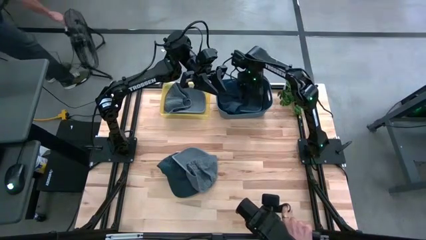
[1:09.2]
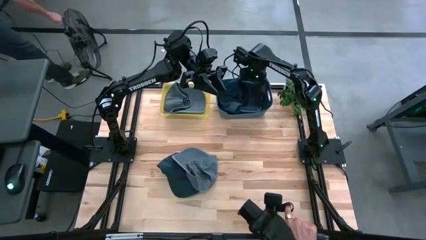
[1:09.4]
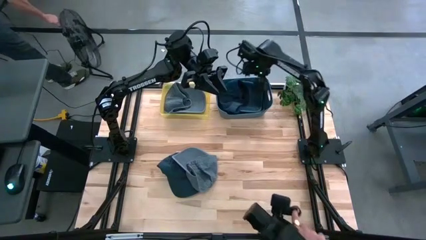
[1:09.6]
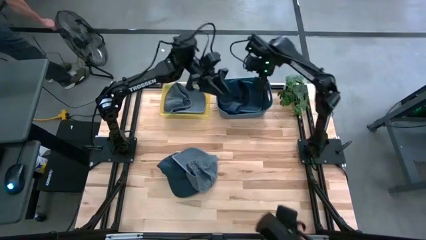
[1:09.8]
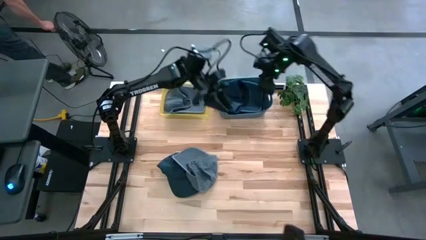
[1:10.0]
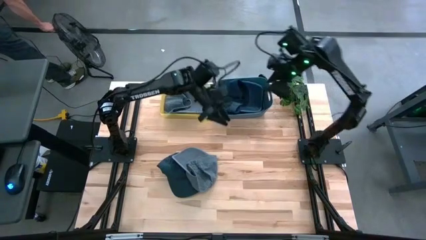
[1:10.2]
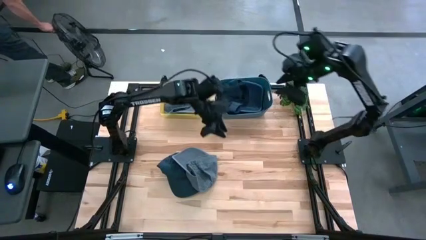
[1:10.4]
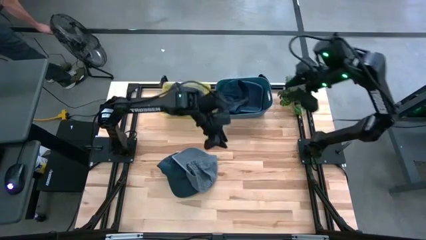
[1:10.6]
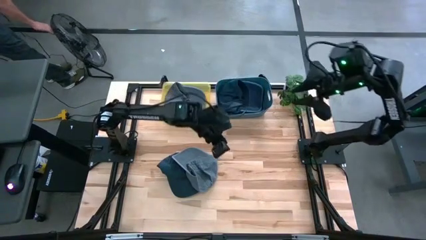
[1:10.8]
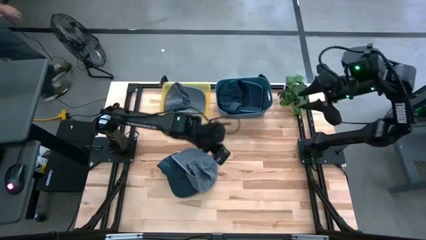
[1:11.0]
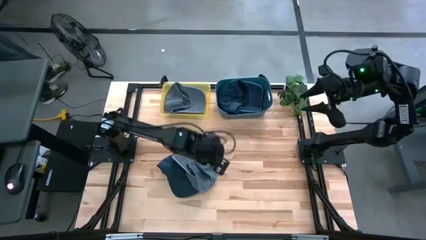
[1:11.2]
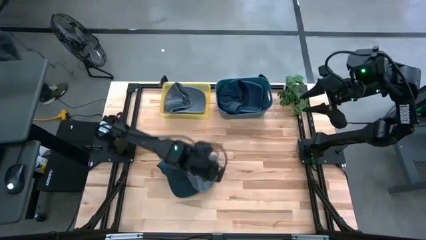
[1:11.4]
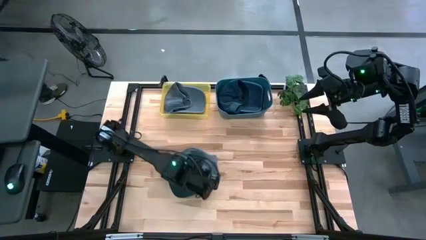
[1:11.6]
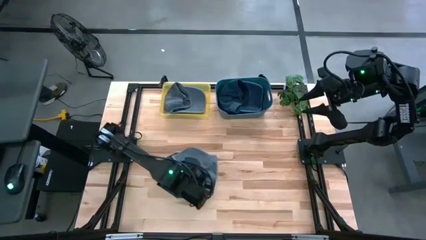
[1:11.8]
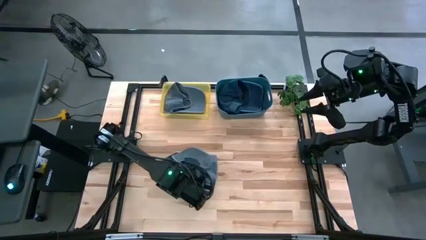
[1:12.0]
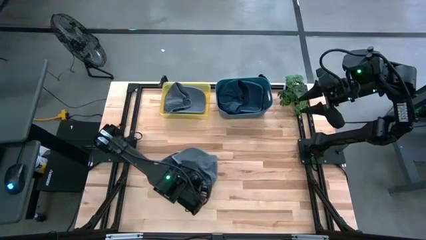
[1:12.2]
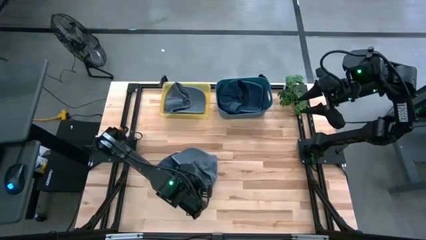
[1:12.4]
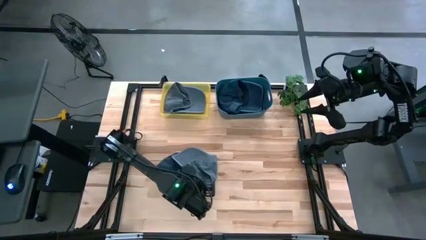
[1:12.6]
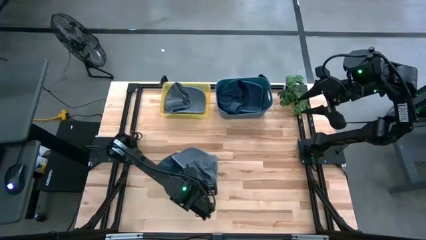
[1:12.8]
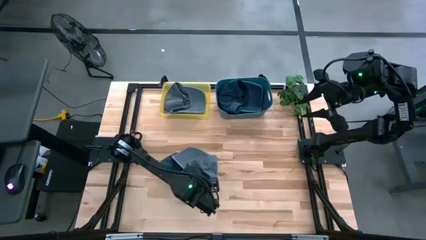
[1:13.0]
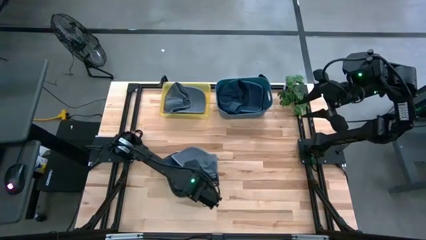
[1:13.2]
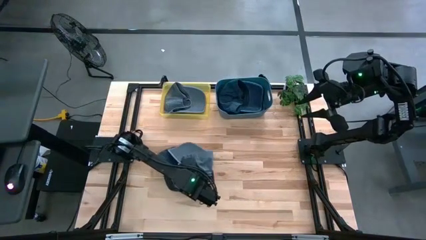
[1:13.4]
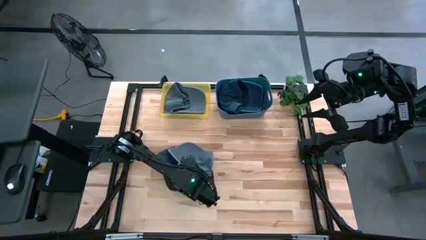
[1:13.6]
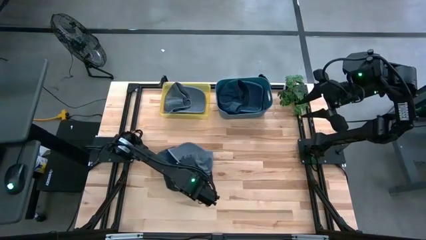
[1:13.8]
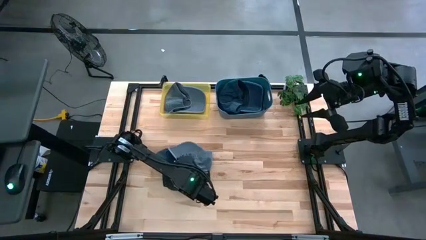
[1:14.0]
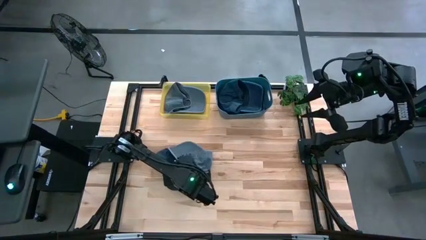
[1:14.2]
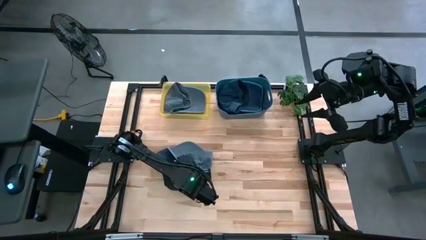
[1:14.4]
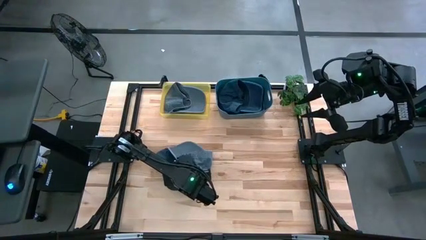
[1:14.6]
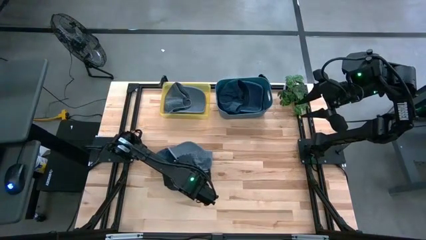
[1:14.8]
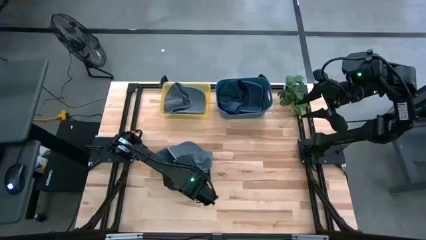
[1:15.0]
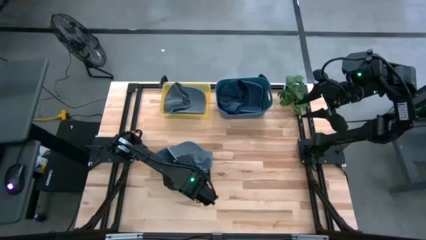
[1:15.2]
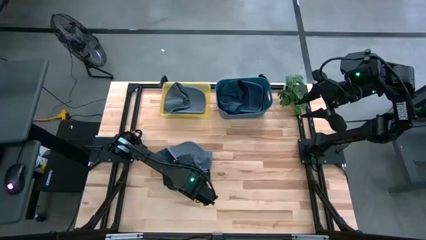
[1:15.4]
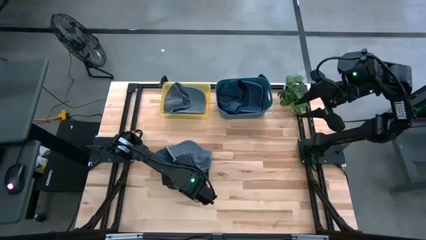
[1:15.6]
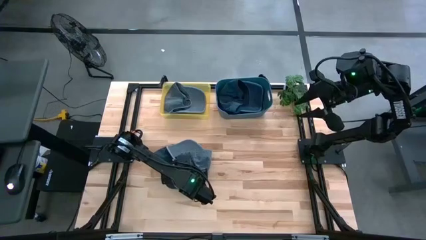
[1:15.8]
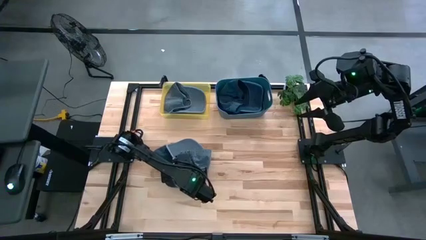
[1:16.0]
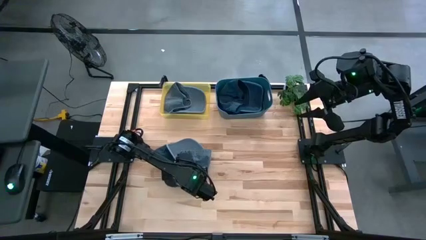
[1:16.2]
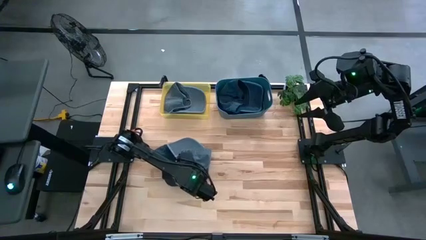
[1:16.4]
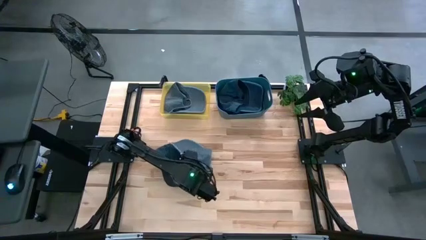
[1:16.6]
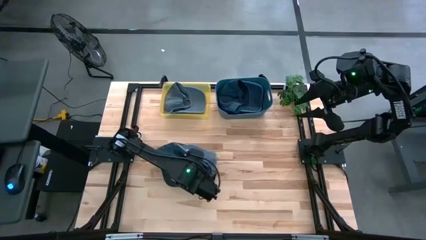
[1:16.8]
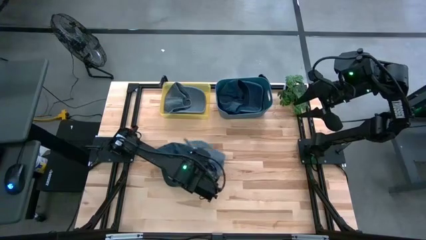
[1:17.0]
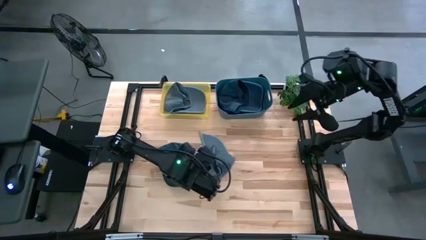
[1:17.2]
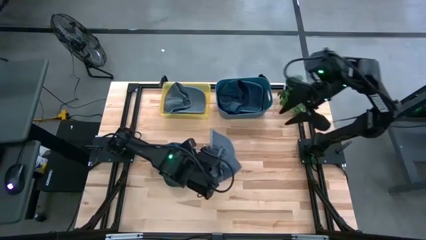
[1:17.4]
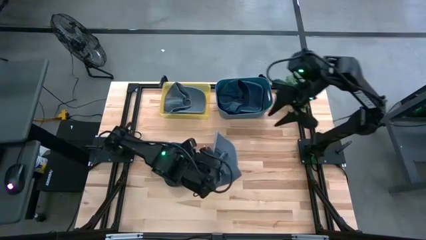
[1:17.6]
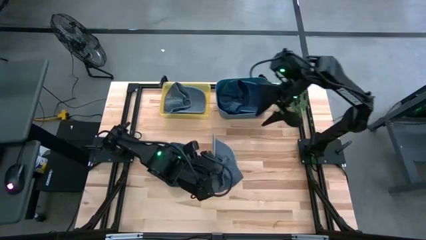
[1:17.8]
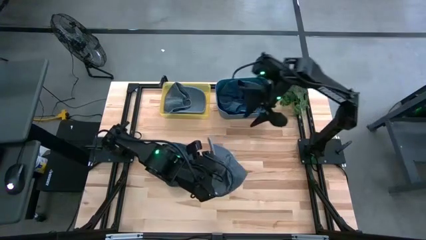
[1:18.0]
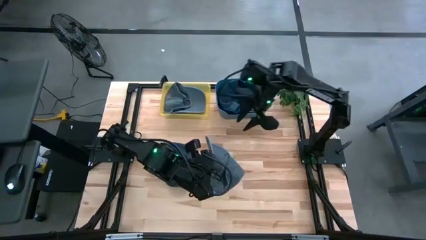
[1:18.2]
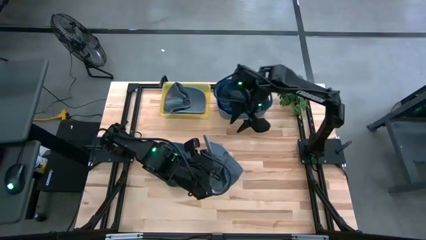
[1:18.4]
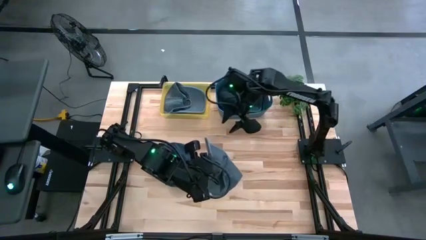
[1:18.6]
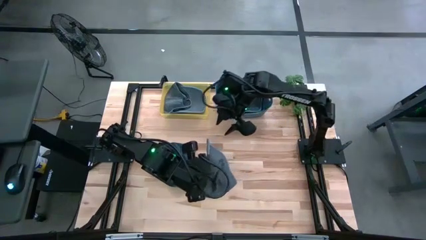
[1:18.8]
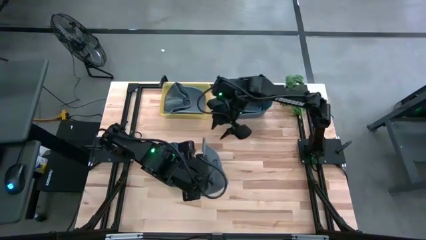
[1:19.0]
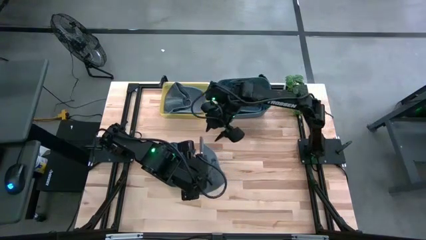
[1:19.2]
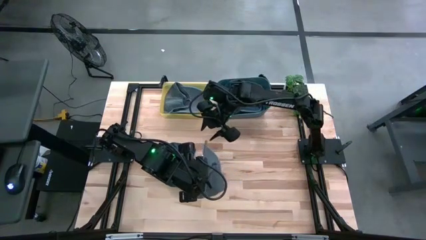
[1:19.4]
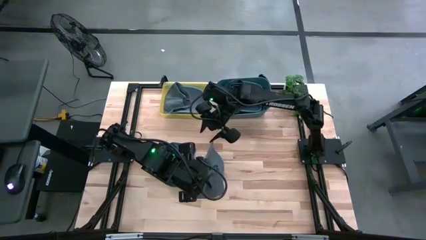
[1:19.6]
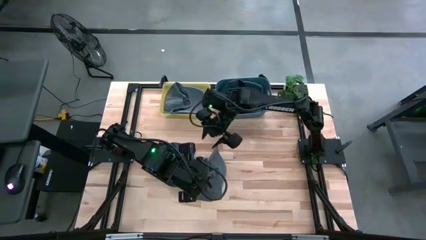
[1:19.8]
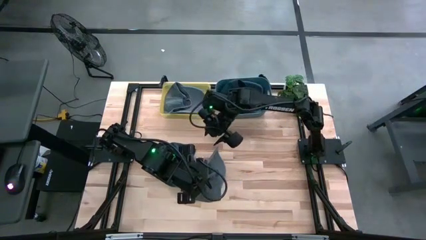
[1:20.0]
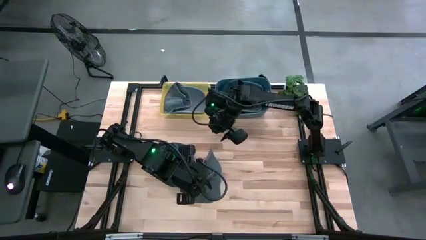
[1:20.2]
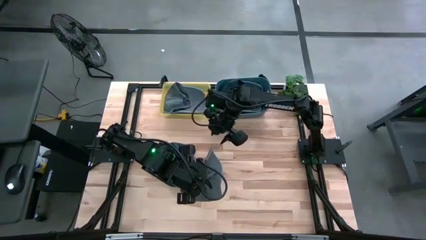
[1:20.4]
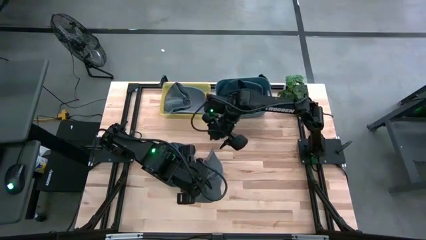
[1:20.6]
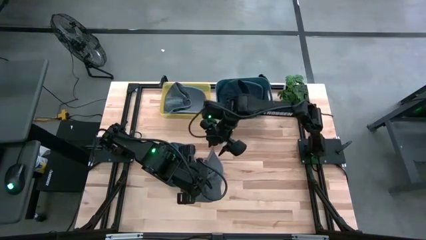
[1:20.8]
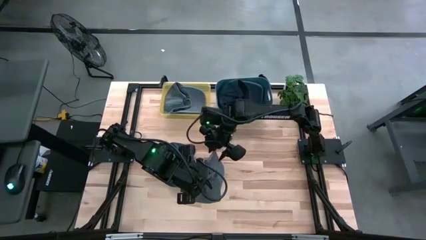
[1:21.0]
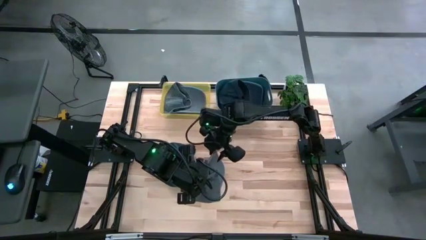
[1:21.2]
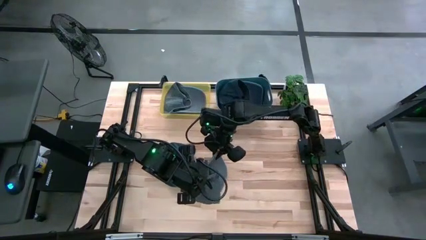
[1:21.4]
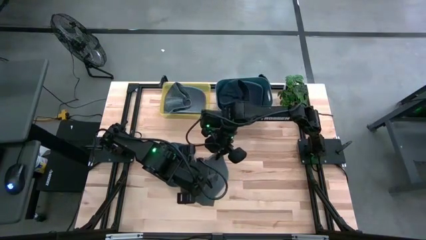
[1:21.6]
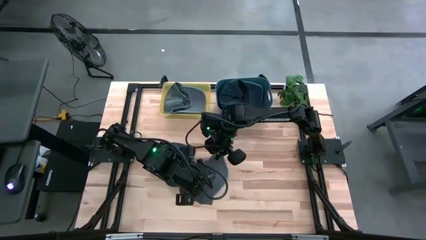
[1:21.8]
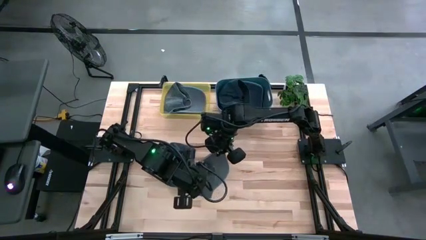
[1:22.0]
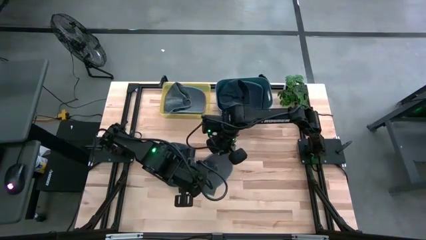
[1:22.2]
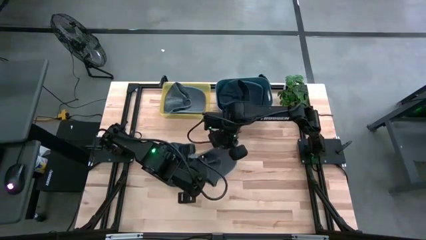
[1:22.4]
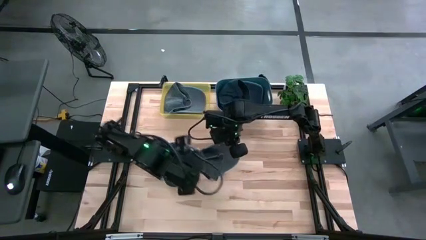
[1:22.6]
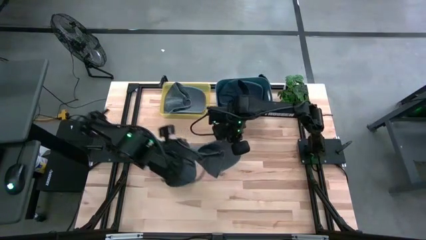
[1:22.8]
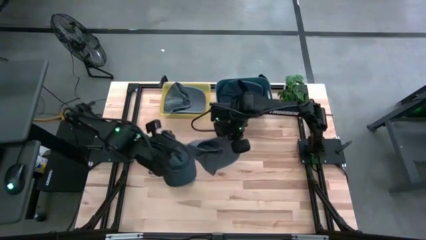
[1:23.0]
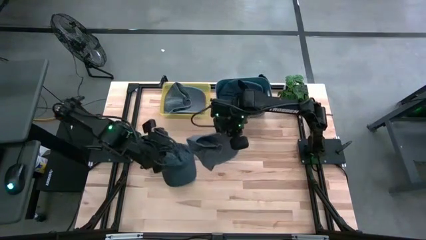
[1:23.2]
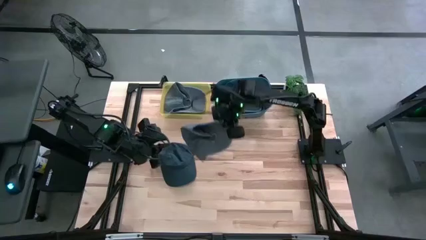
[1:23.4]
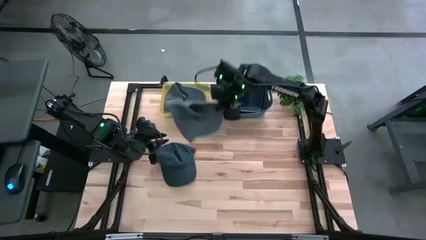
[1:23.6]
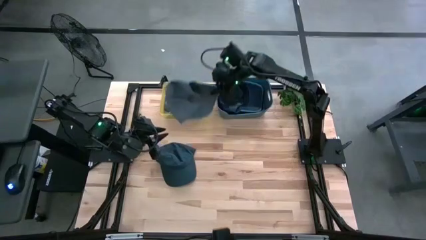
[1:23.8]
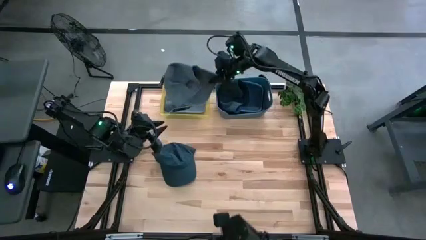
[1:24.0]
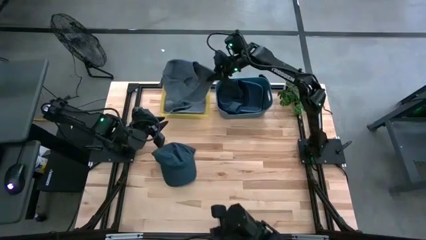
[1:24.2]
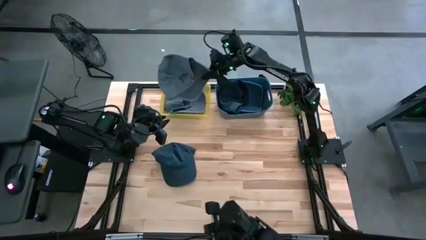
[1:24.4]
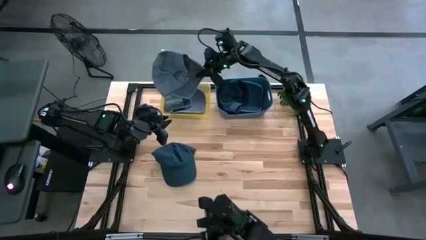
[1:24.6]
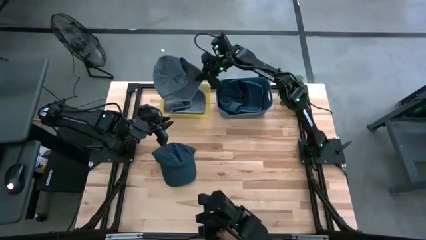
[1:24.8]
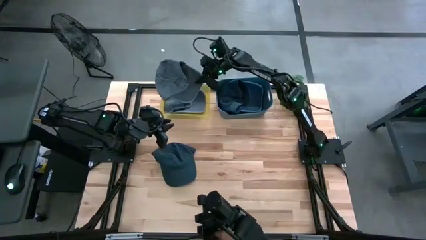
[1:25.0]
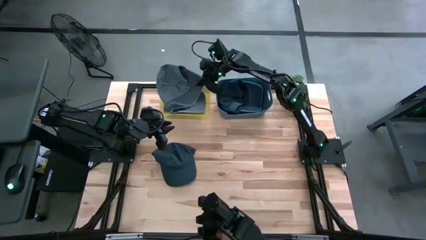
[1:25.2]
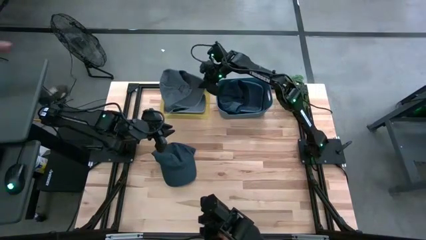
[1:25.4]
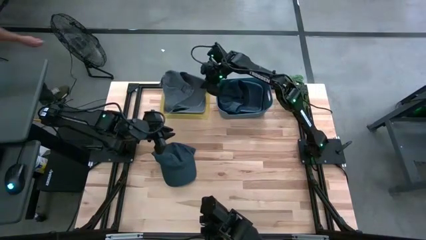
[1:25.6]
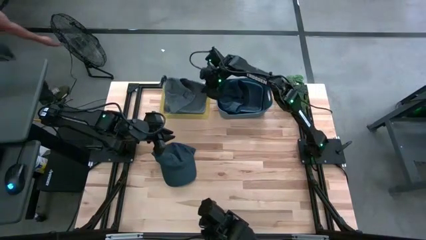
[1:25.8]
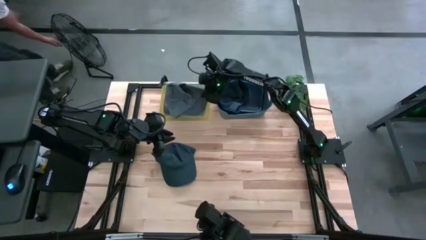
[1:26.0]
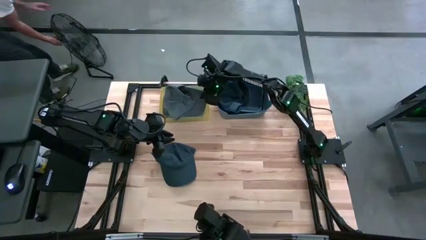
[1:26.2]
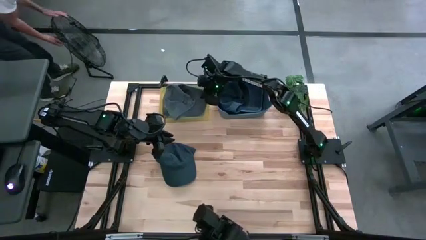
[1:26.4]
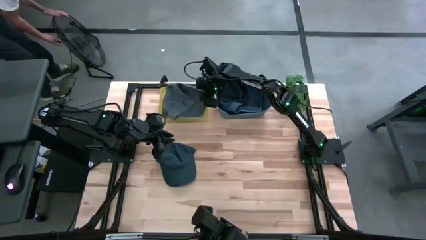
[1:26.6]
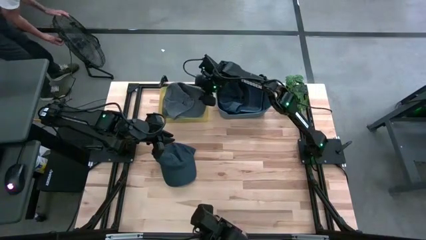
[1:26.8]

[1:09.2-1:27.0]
Task: Pick & Place hat
Put the gray cap into the yellow bin
